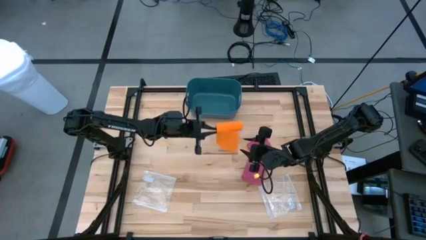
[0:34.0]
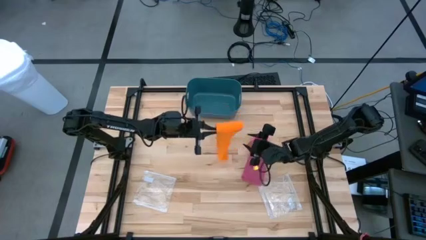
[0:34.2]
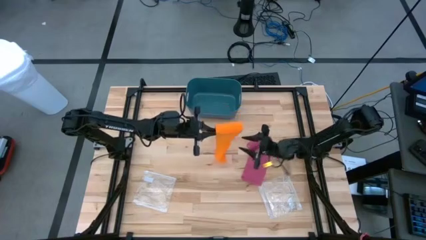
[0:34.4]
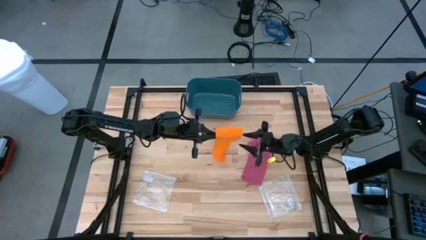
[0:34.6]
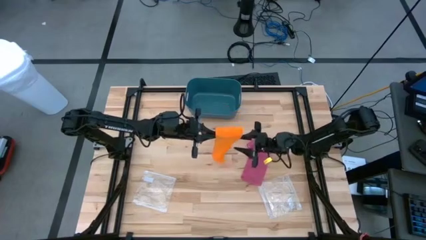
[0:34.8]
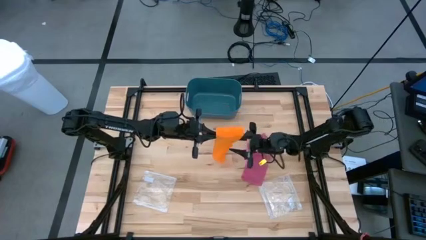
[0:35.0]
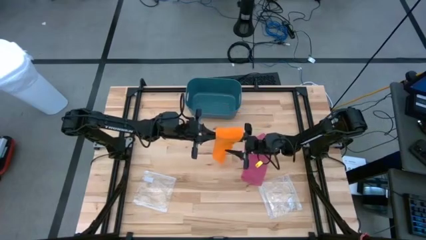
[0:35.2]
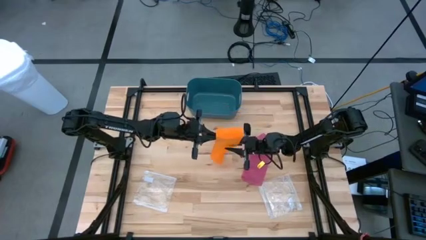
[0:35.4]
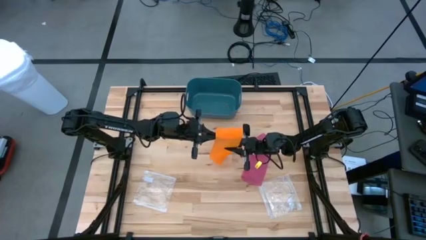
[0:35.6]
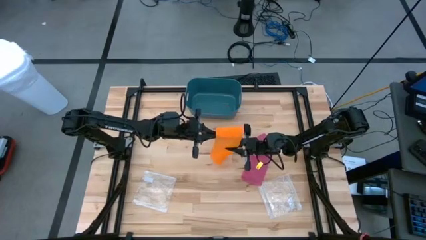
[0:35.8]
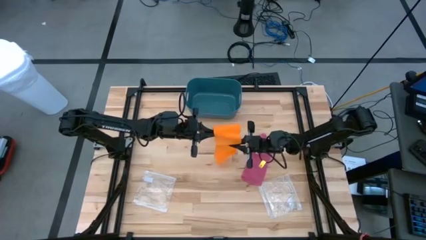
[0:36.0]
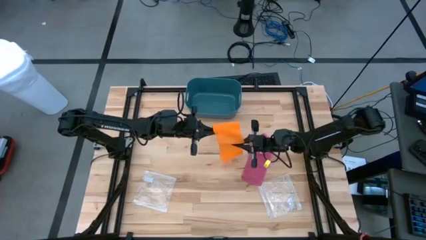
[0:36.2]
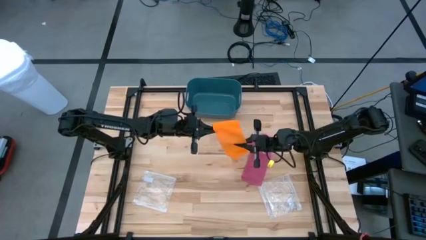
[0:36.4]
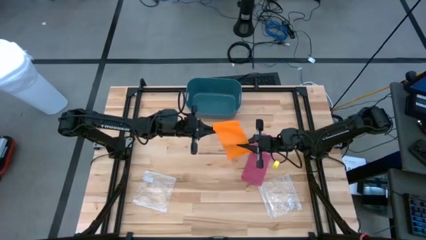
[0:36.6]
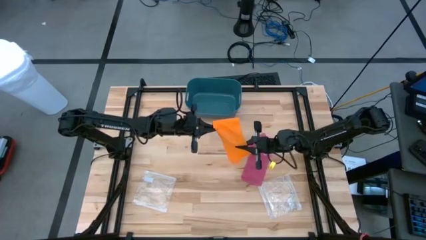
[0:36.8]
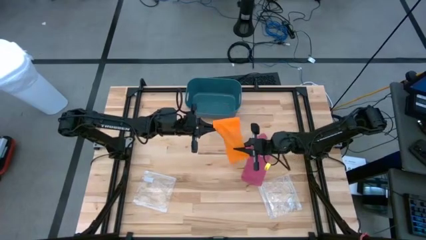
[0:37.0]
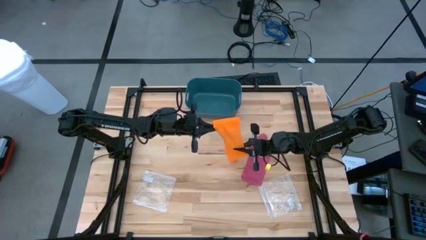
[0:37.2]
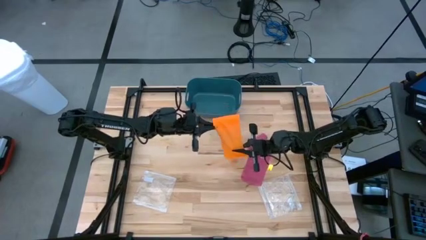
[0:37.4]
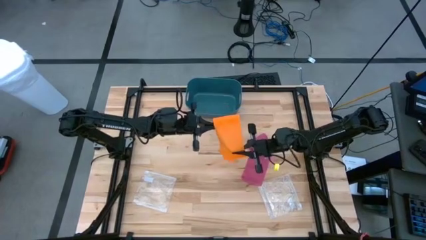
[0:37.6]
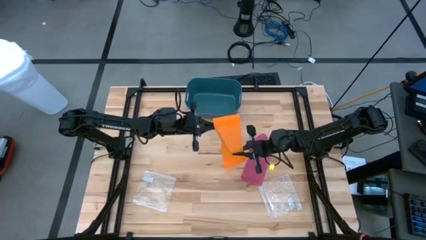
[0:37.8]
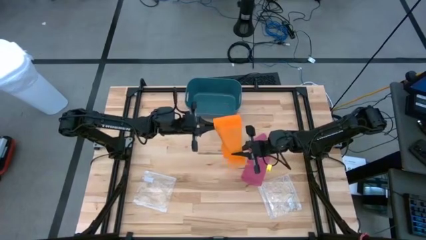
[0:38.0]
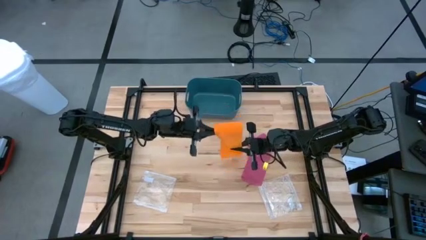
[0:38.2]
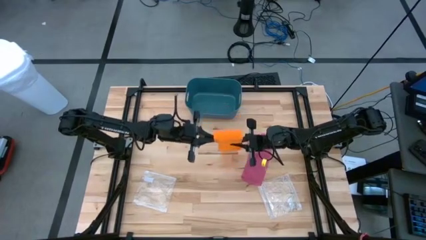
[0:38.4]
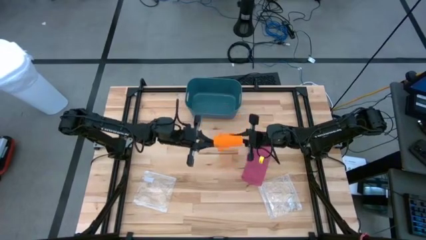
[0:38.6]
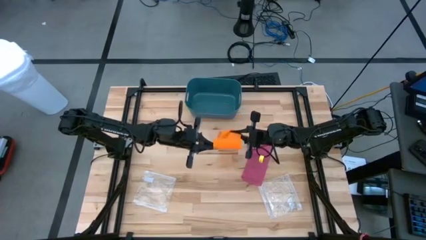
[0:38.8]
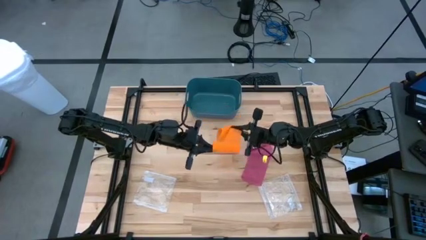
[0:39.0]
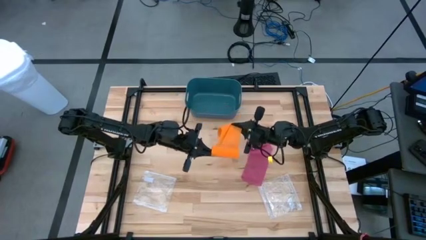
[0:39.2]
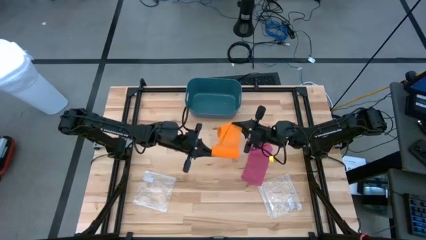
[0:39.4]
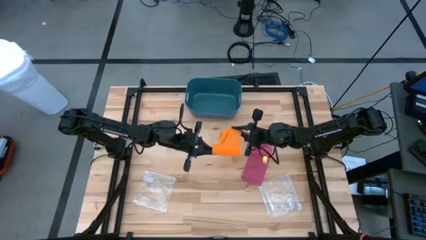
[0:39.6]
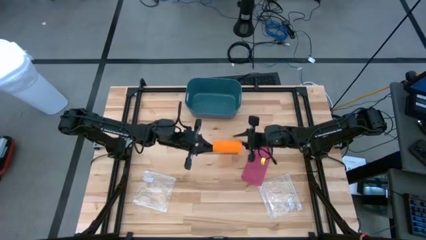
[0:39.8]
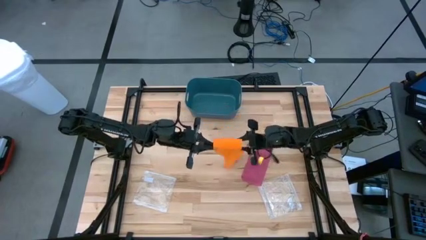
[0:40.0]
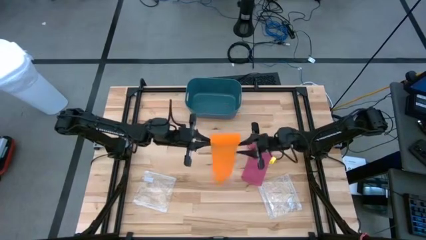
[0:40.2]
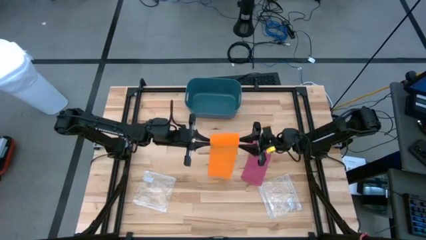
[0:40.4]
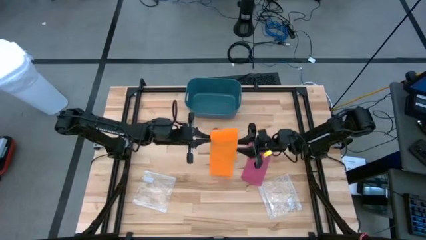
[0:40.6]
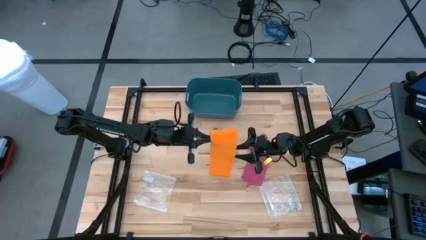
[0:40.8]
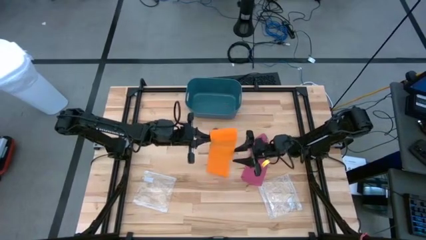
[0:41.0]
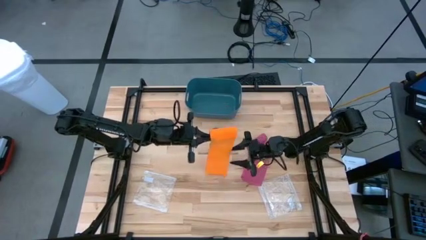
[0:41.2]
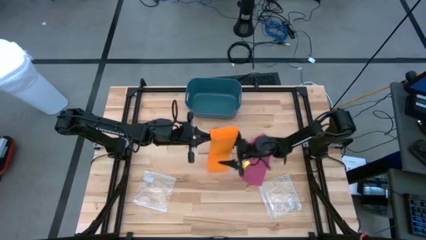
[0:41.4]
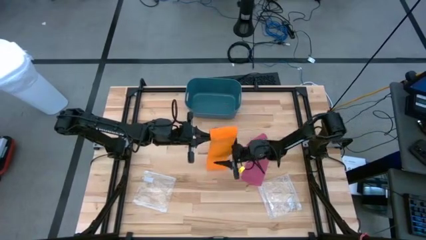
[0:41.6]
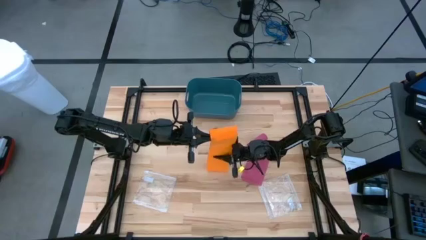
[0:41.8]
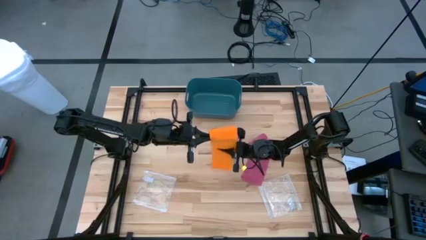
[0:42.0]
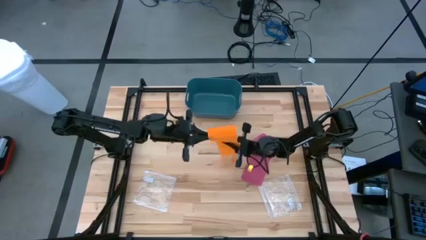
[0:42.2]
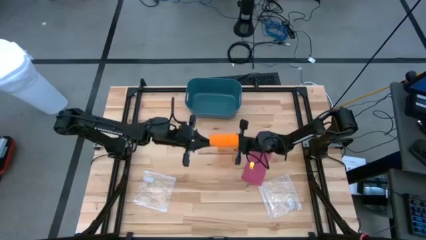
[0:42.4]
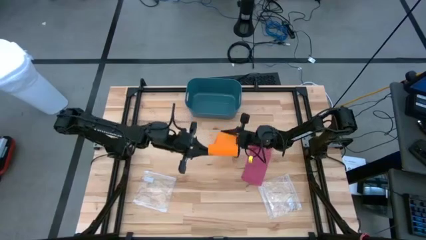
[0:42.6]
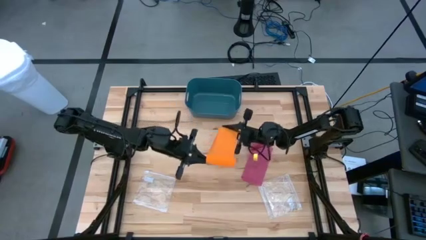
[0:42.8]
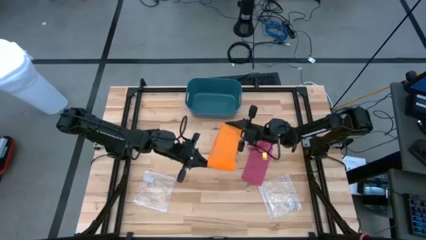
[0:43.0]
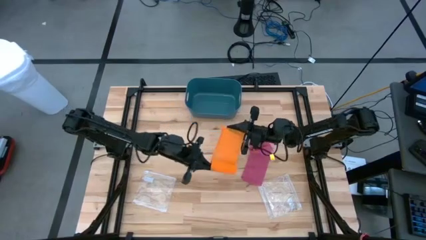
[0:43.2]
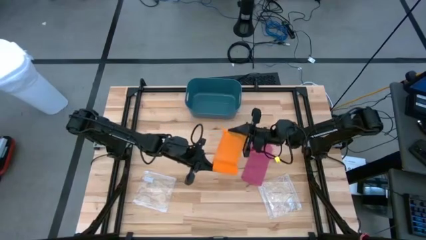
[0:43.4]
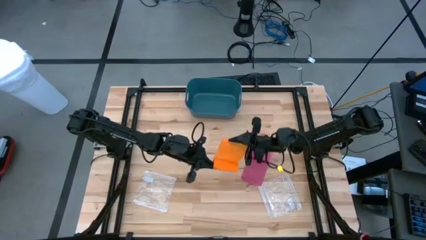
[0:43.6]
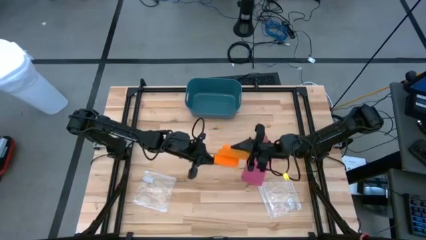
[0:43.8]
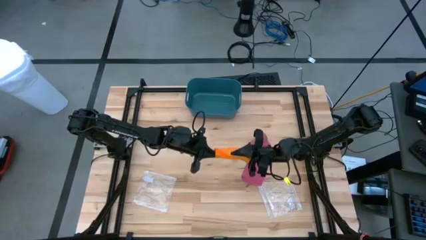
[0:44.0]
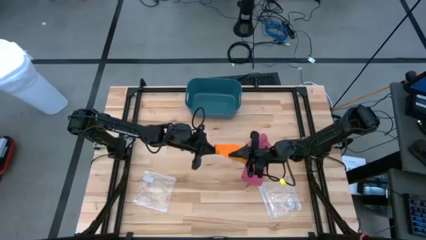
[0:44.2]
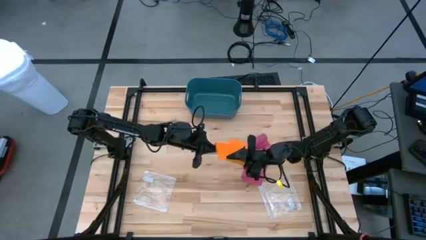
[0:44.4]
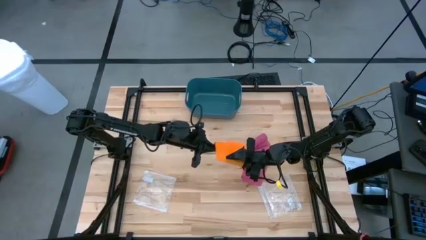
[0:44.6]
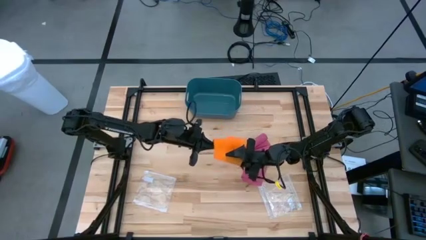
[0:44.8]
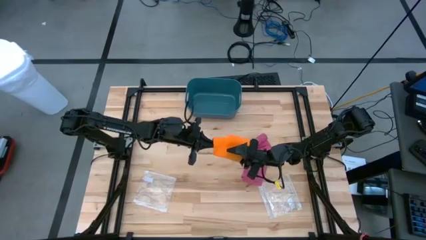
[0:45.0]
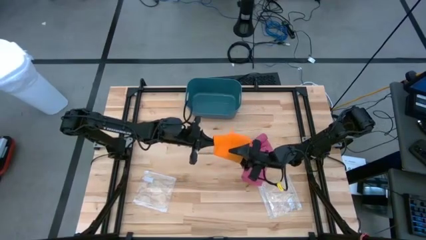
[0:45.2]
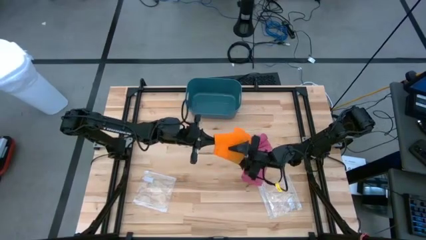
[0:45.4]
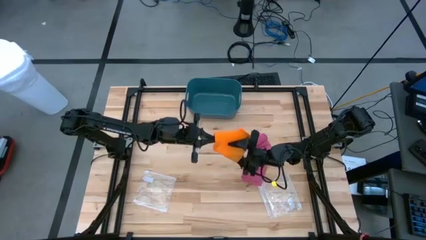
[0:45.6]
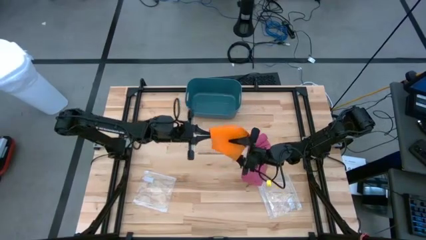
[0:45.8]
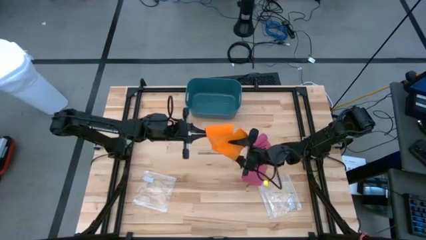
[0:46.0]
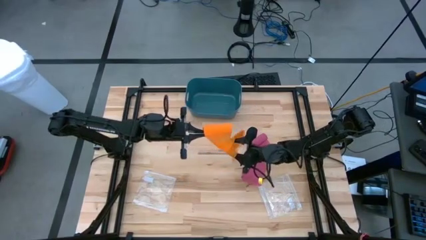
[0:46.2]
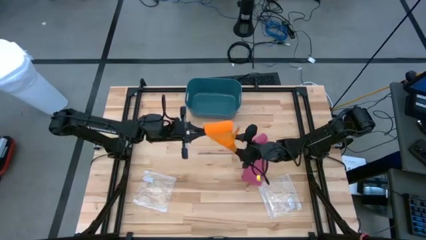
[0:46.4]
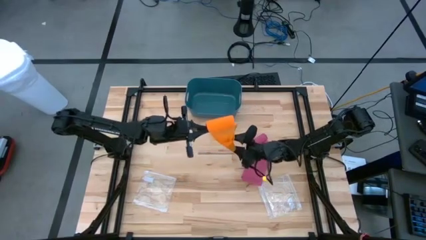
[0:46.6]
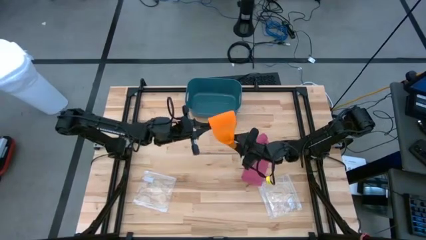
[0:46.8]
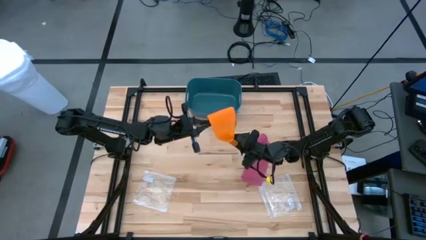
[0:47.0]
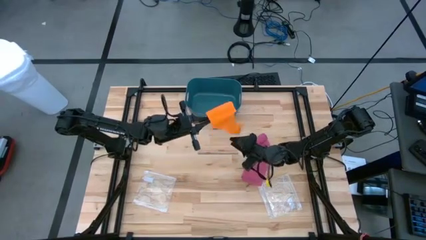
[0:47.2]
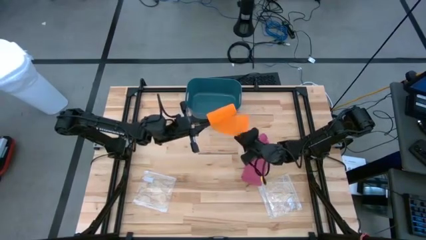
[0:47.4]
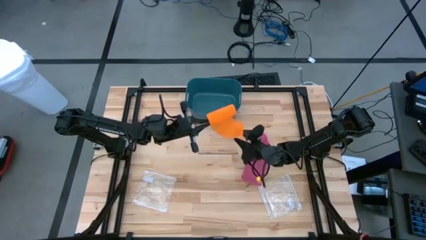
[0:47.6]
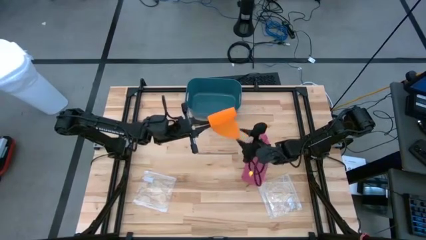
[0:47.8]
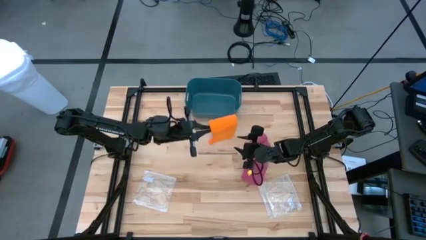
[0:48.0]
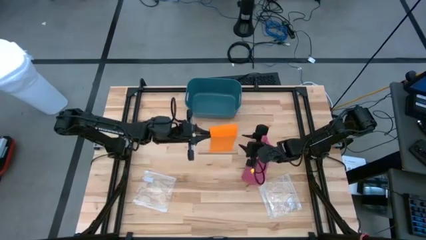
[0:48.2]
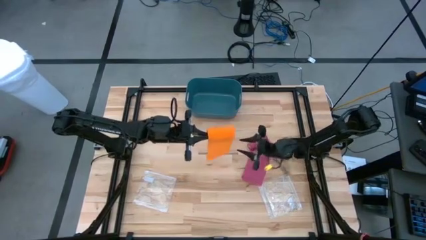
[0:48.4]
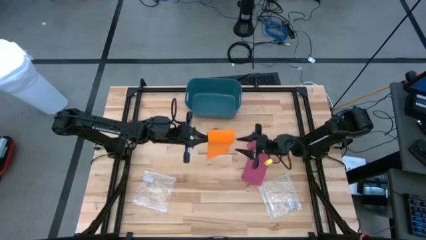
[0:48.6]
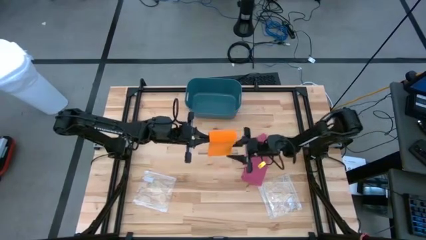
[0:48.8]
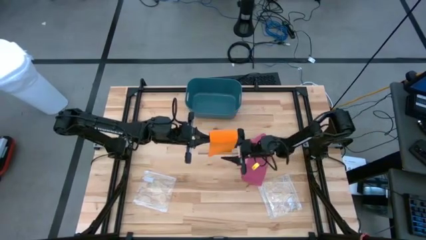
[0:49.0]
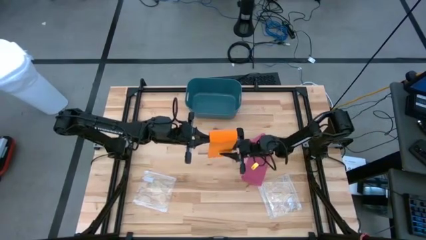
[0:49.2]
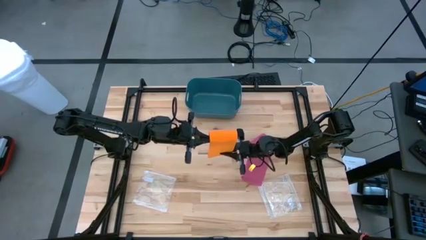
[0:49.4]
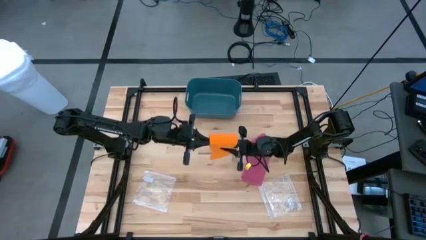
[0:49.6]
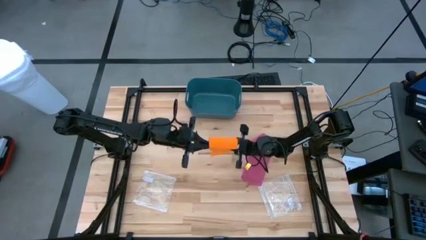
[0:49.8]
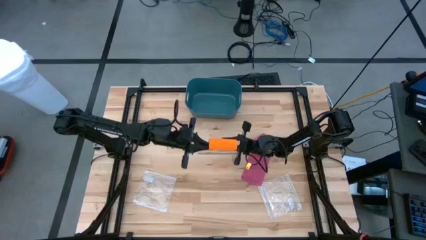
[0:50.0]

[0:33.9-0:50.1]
Task: Roll bandage
Roll the orange bandage
